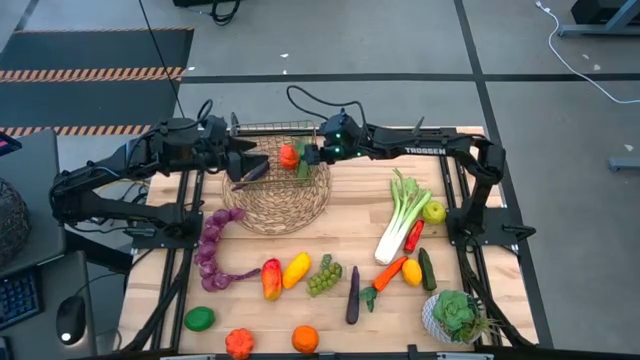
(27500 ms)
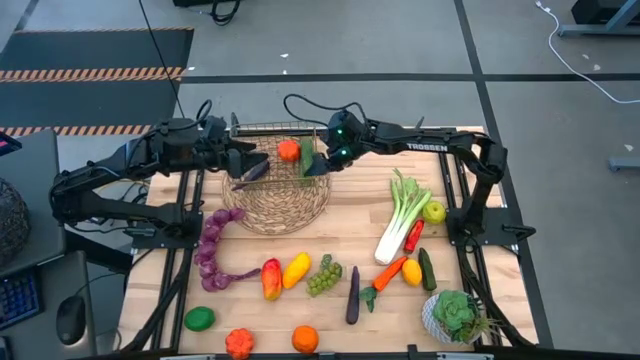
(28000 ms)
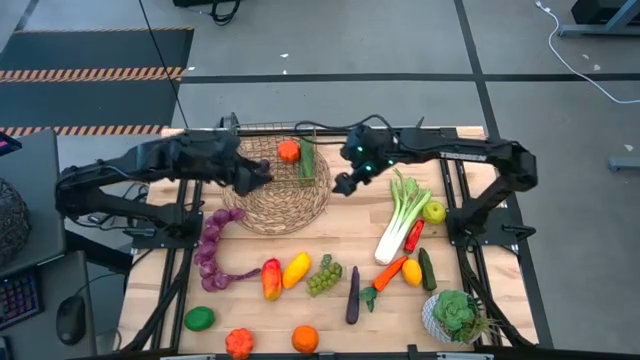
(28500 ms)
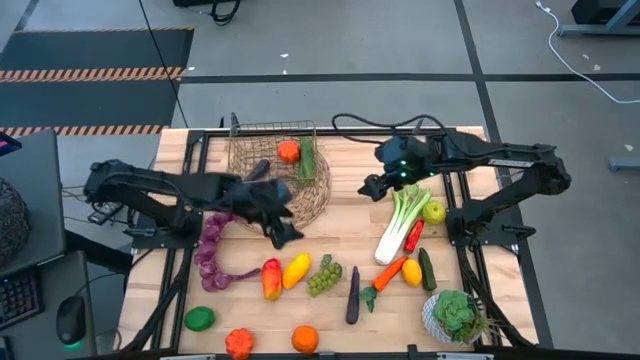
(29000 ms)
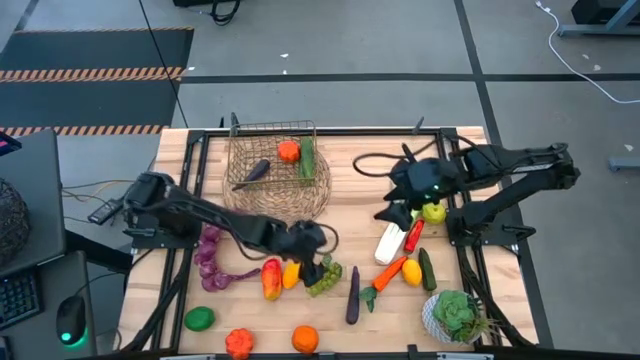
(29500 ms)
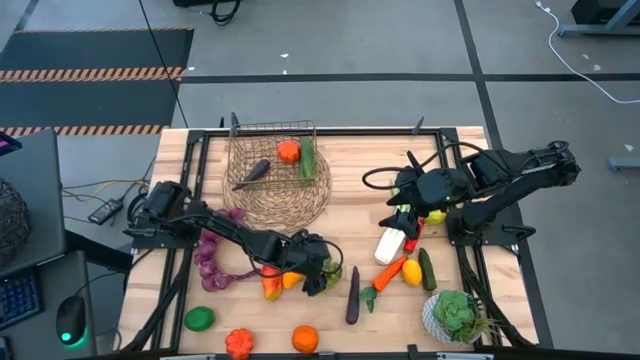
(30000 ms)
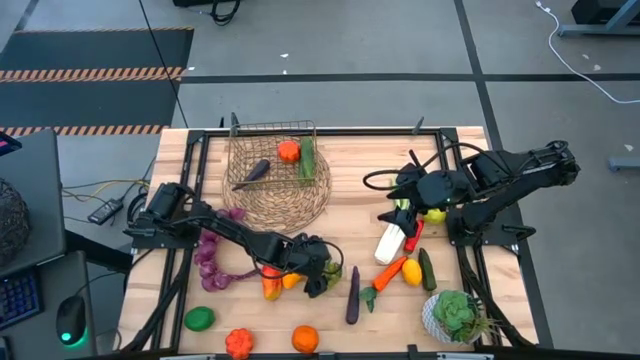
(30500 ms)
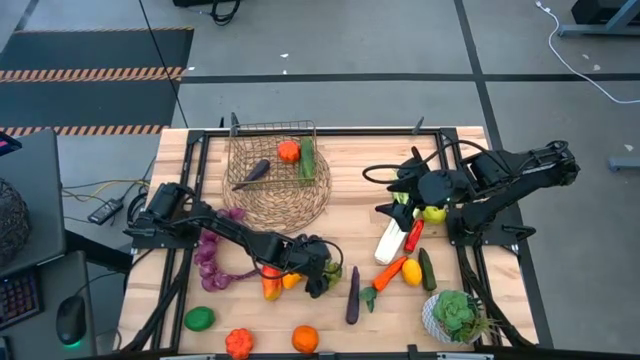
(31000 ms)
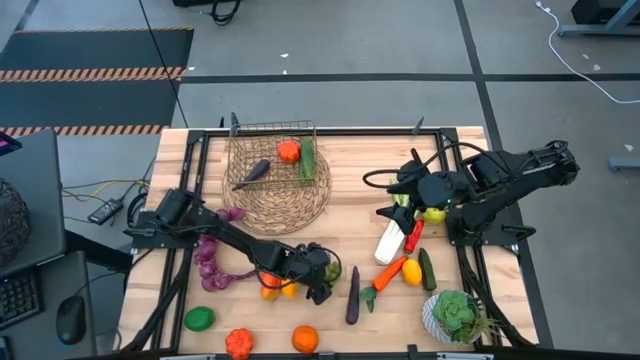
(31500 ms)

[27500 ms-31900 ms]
Task: Build produce basket
Put the green grapes into the wire basket

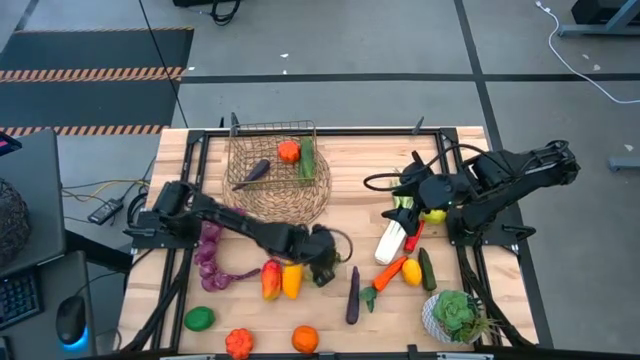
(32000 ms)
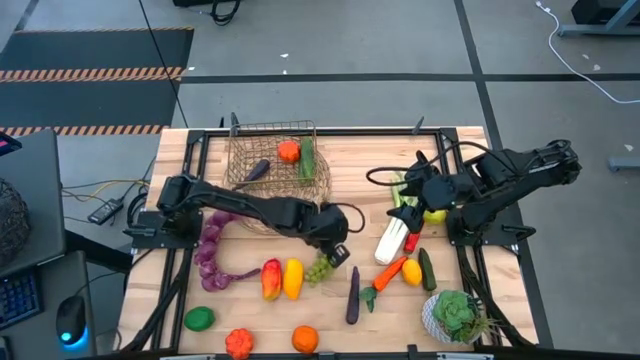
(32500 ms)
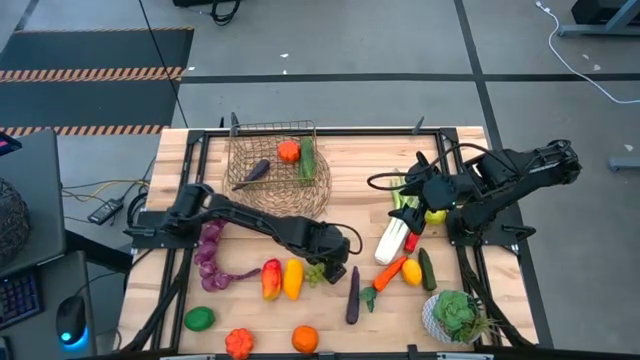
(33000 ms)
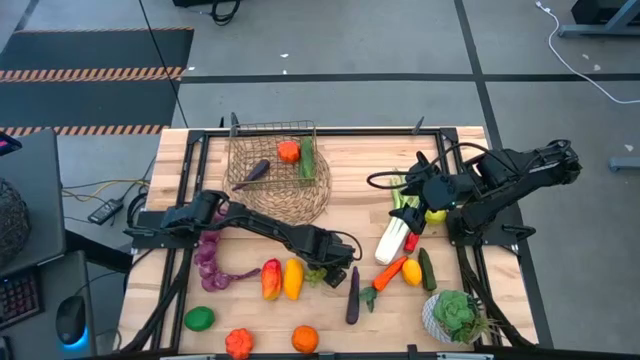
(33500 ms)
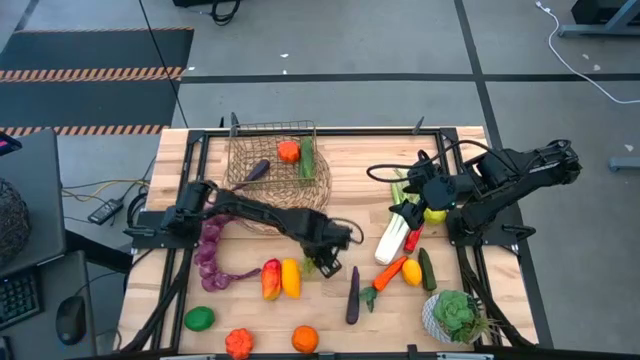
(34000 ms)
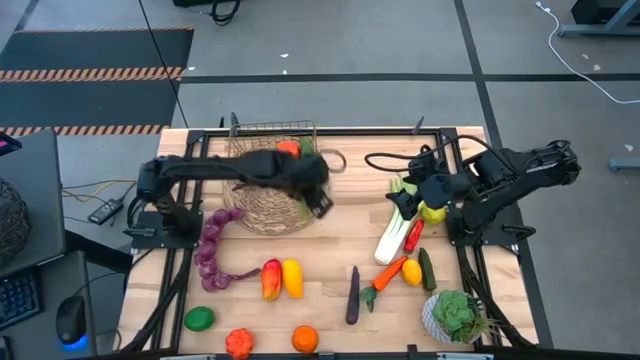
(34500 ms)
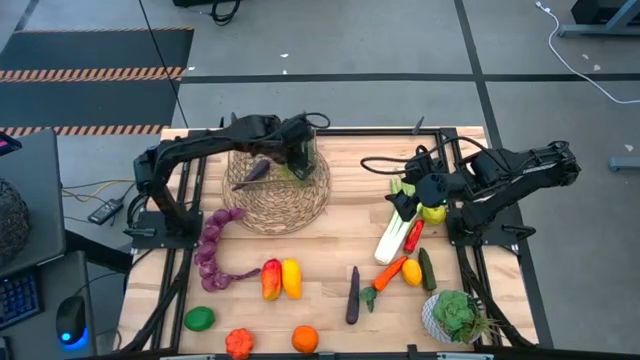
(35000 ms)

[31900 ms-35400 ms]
Put the green grapes into the wire basket

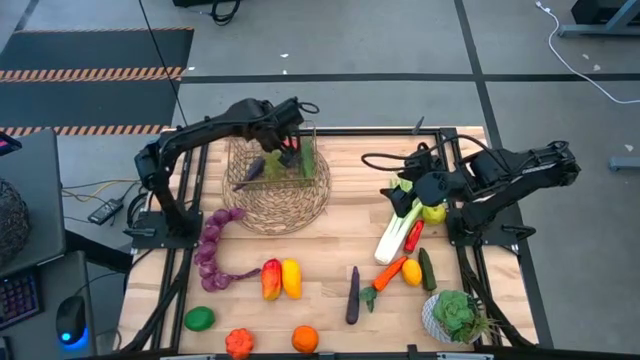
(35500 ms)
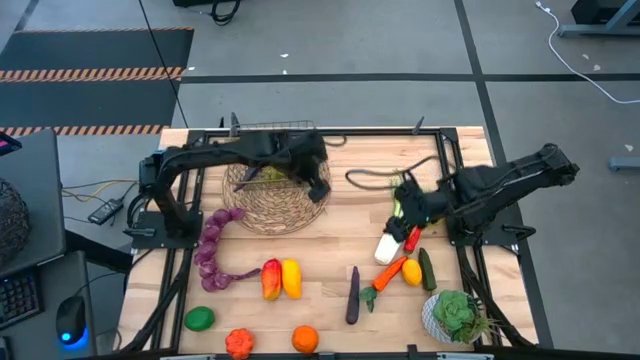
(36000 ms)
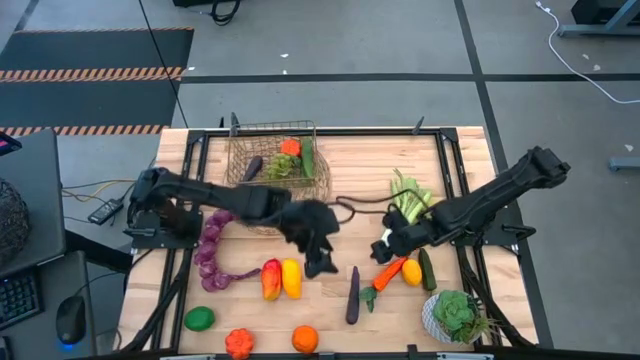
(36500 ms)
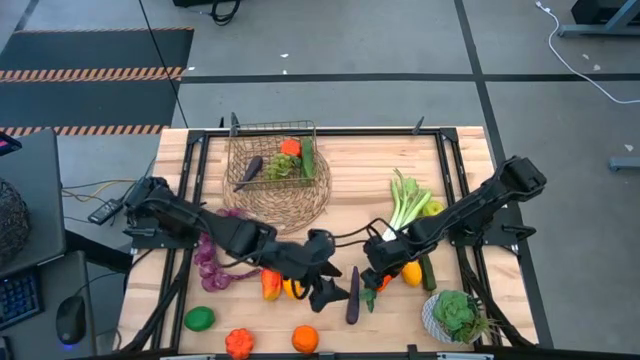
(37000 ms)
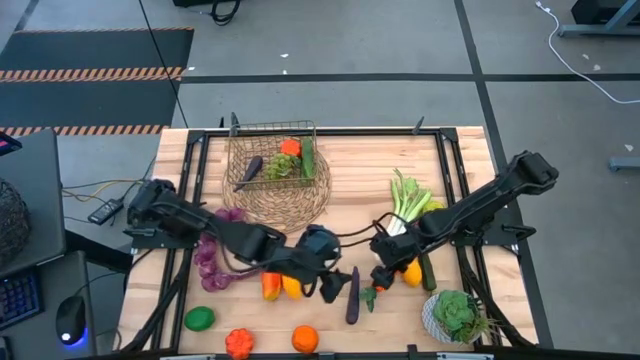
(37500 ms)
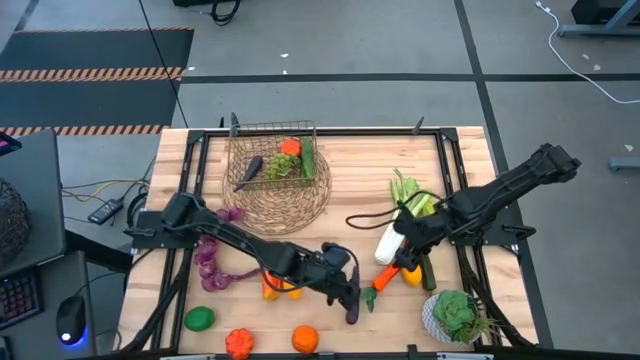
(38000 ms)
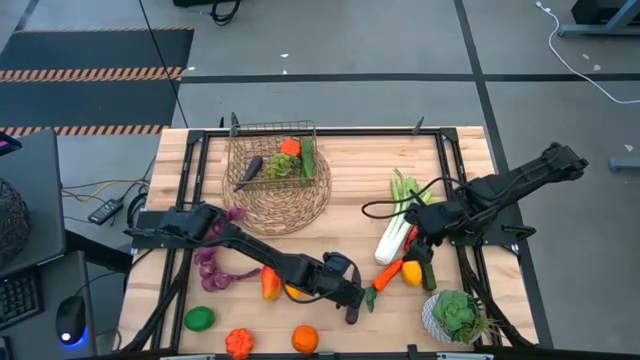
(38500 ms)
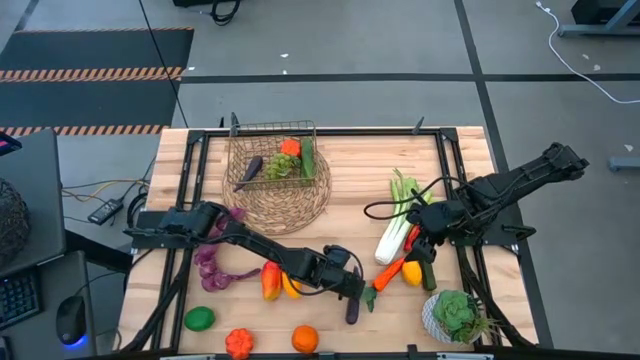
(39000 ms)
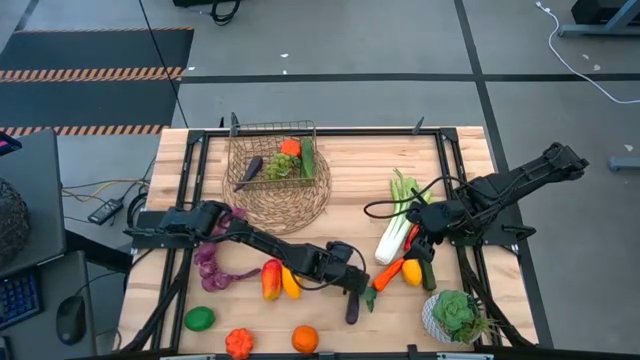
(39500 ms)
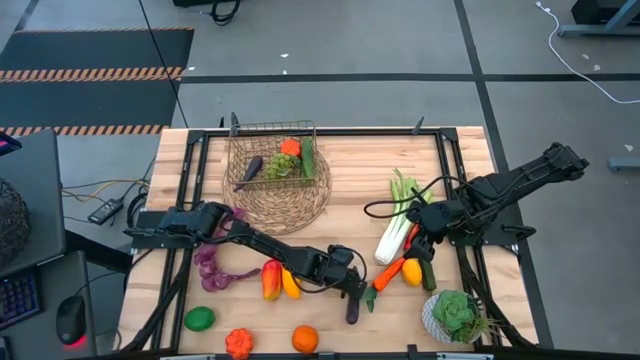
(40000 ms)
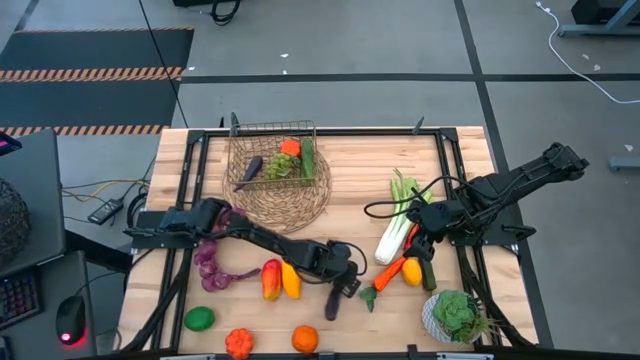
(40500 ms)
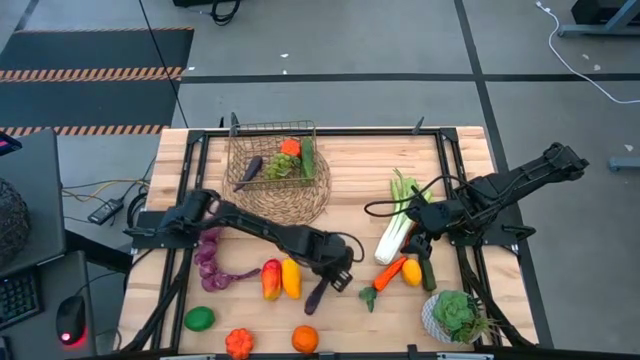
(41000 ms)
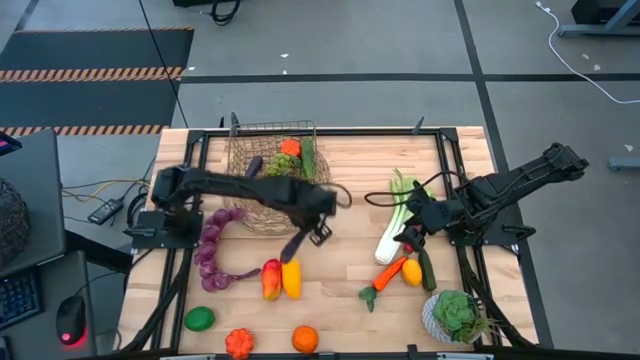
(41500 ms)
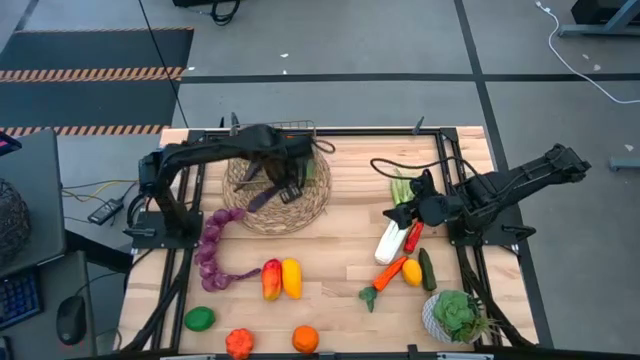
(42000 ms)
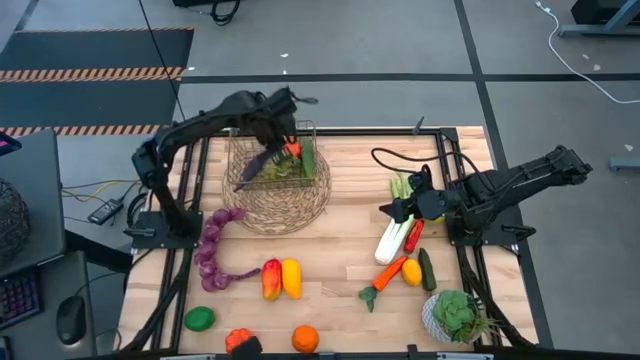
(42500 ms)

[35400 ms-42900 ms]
Put the purple eggplant into the wire basket

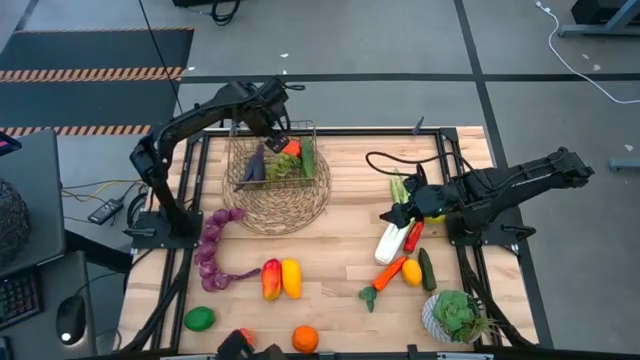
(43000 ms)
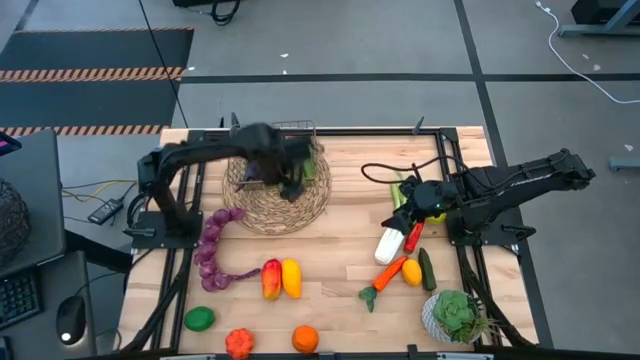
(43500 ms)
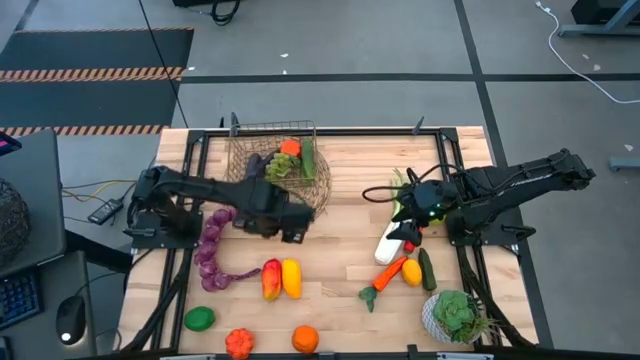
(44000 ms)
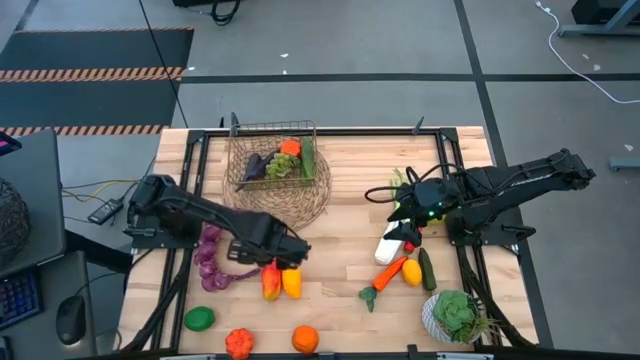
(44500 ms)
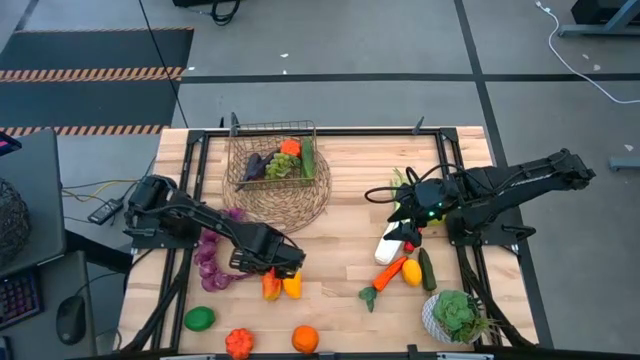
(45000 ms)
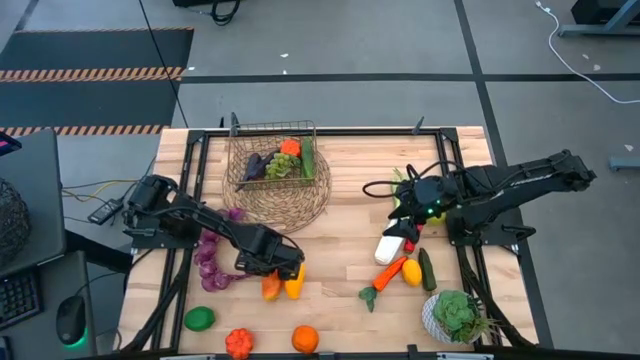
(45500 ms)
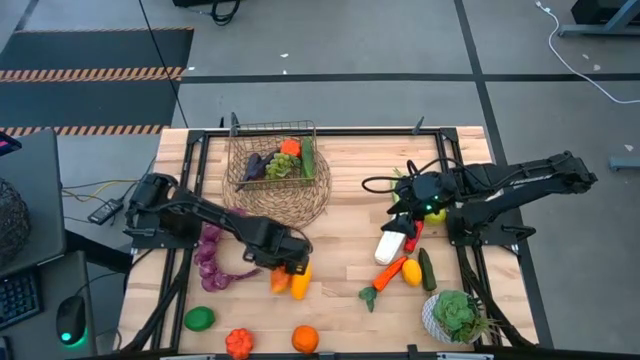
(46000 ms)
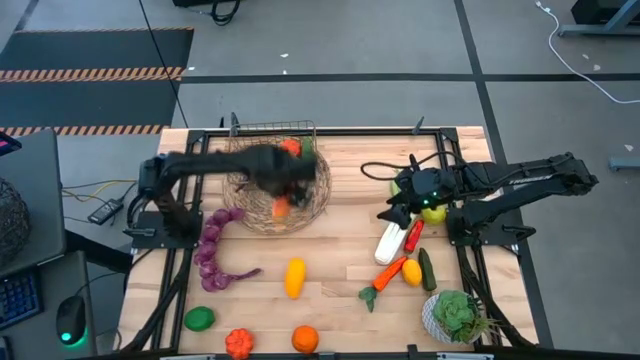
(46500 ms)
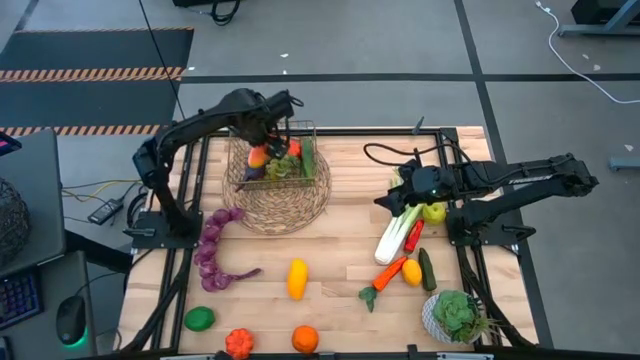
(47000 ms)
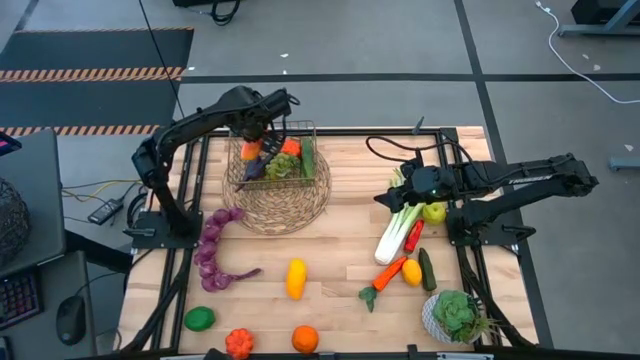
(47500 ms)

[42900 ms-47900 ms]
Put the red mango into the wire basket
